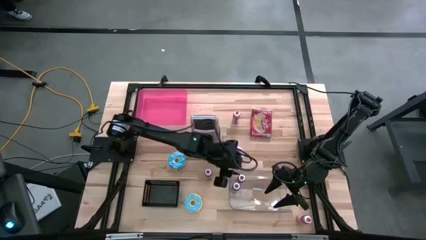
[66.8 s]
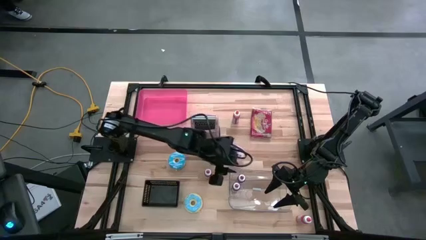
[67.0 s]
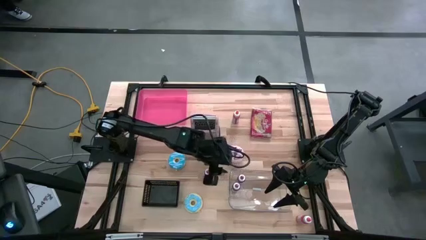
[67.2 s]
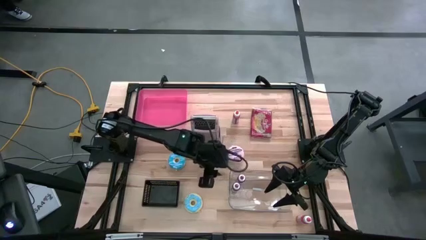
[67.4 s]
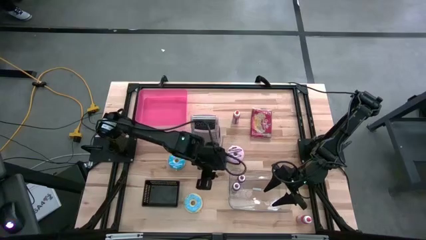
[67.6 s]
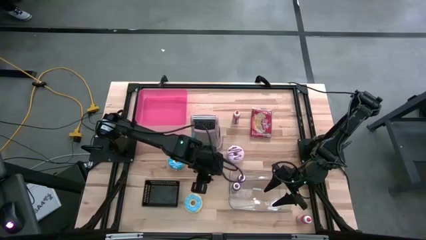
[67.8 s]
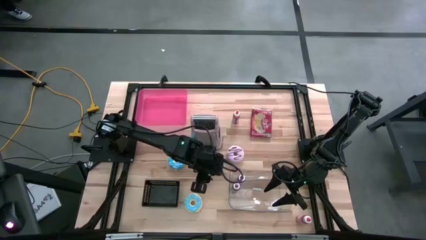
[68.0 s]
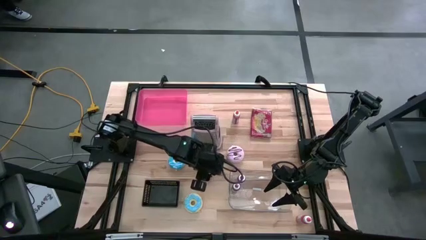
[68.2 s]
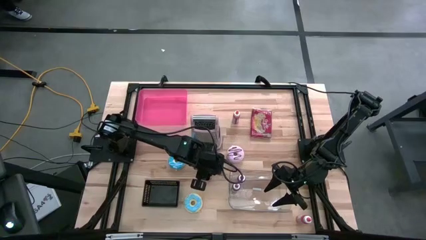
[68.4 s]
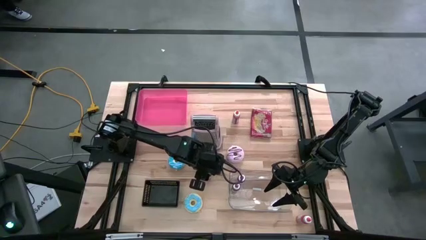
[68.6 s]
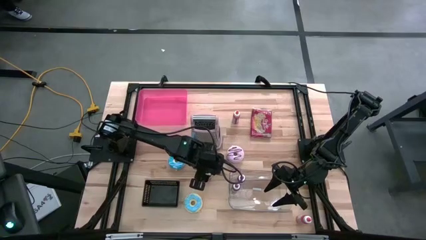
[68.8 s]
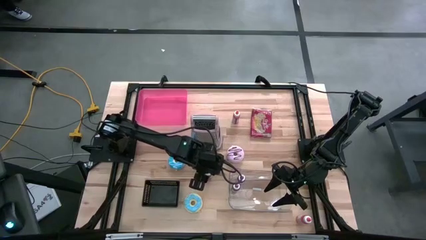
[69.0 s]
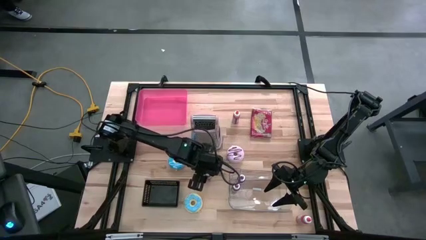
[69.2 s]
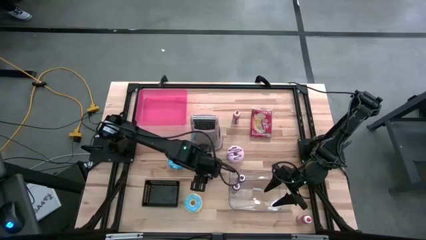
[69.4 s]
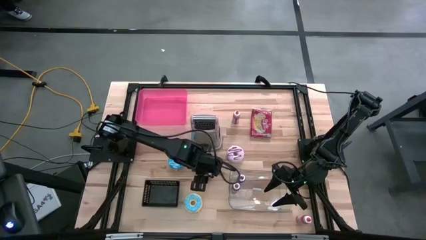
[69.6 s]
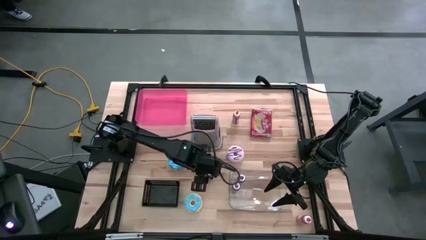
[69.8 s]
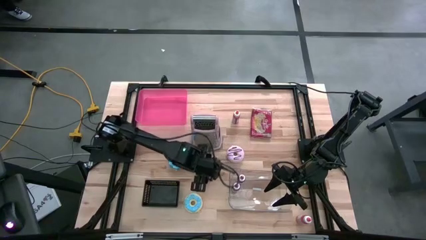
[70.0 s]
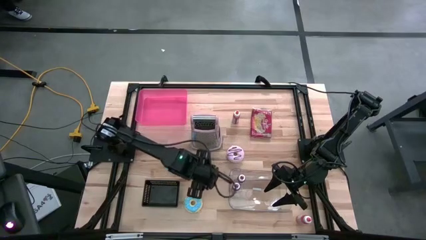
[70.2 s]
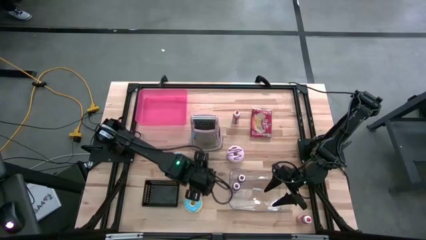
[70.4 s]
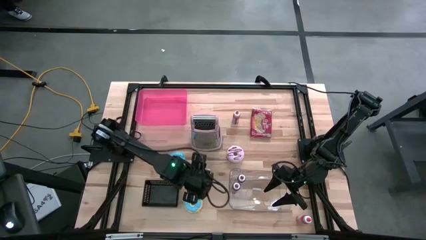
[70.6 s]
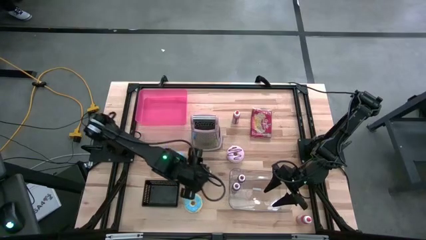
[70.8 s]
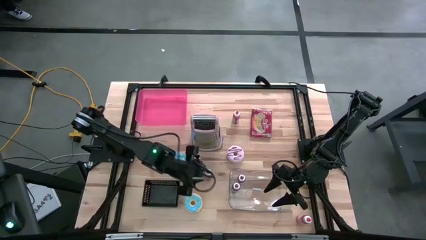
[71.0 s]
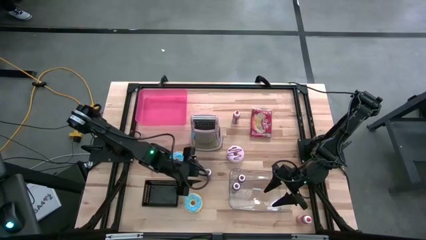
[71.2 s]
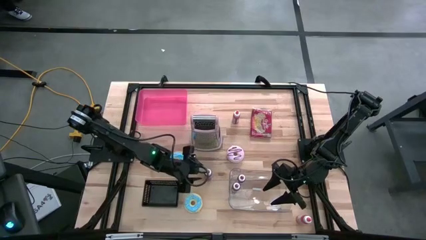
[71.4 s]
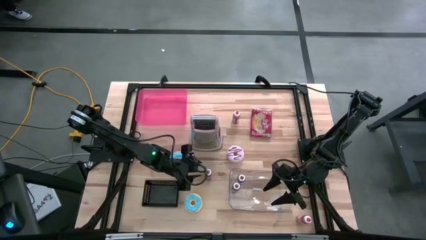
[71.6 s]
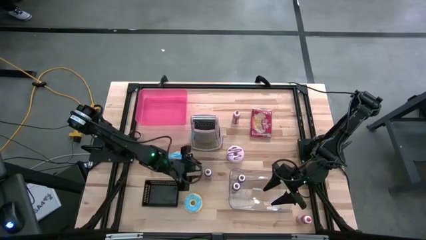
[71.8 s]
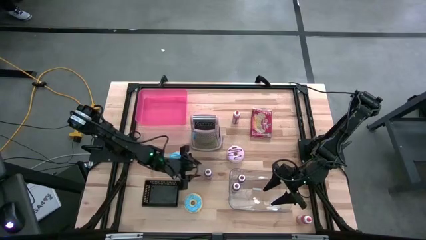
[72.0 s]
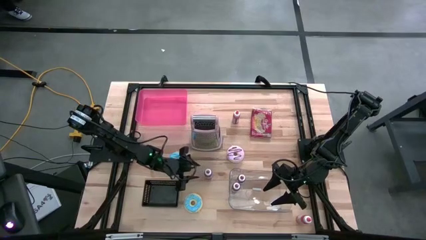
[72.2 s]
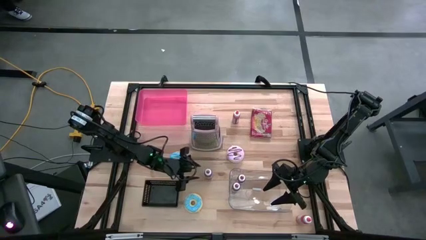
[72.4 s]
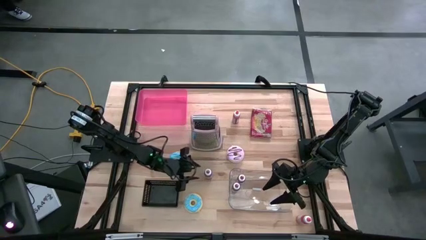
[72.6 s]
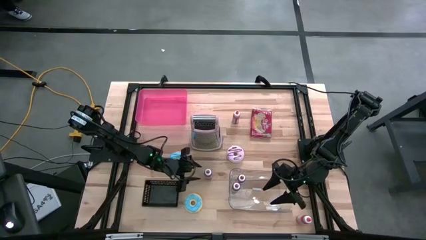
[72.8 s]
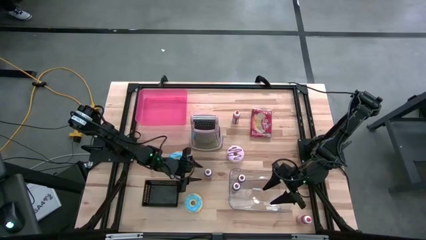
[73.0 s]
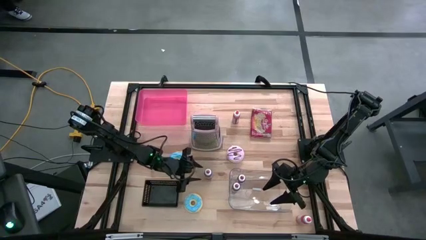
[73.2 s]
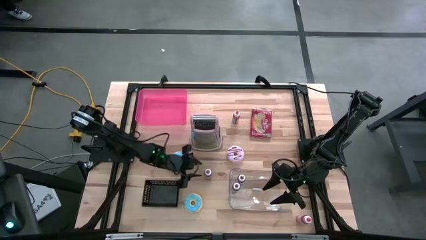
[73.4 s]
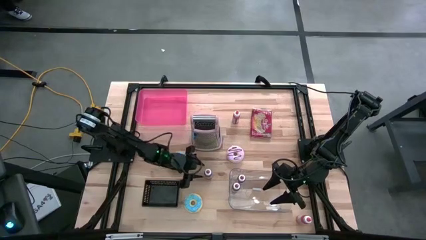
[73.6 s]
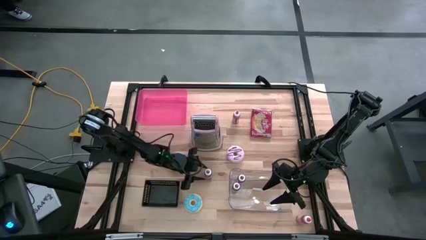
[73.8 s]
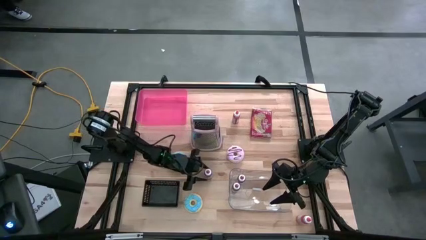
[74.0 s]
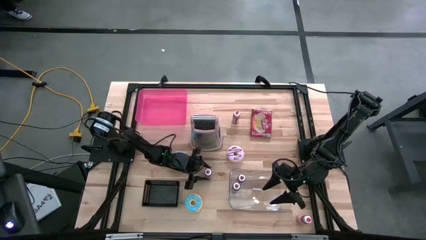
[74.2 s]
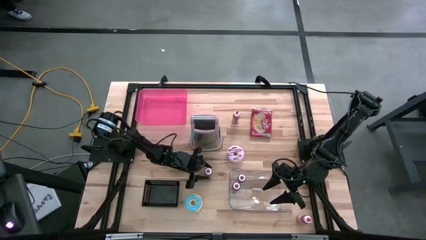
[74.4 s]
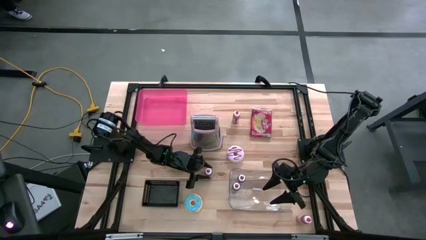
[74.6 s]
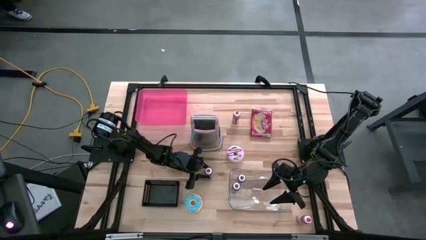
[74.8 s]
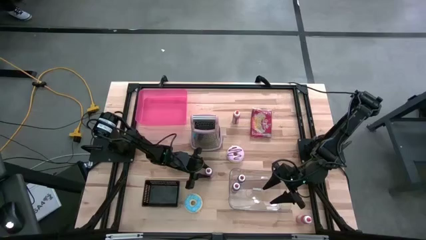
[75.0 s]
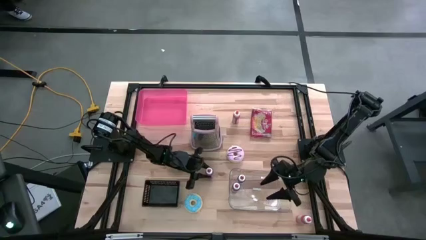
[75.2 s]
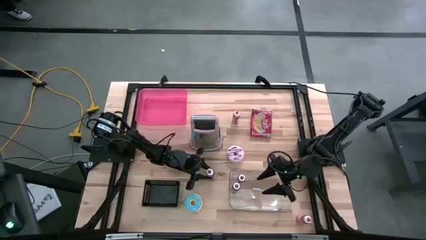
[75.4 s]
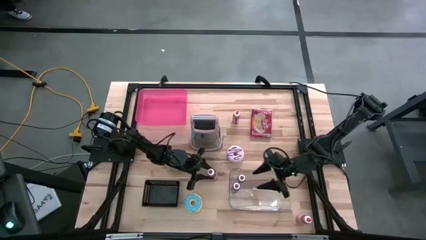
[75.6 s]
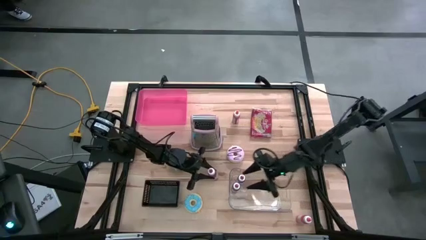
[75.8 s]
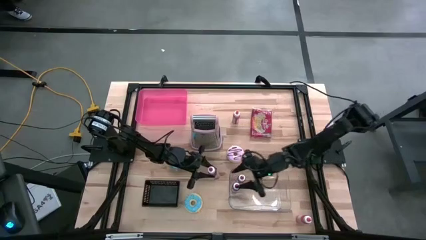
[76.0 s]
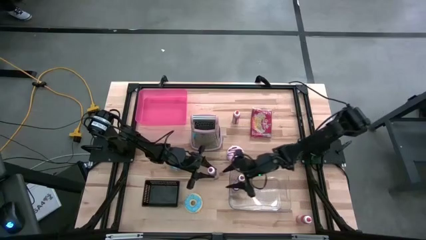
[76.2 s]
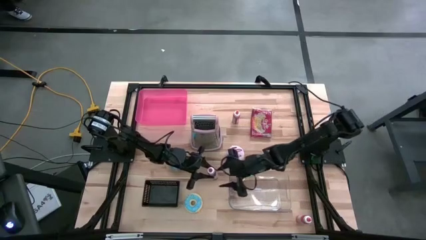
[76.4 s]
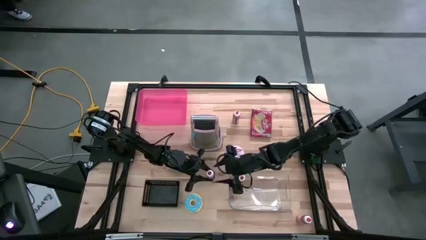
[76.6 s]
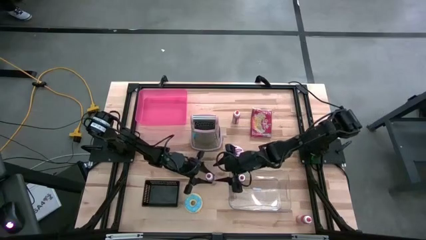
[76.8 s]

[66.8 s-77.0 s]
Task: Pick & Place Food Item
Put the red food coloring bottle into the transparent bin

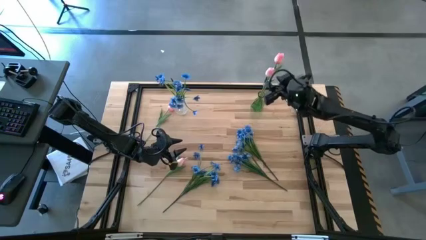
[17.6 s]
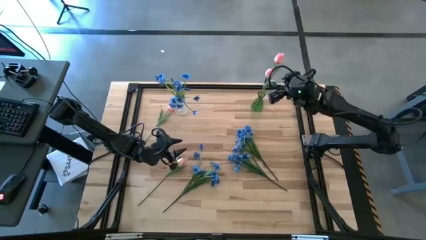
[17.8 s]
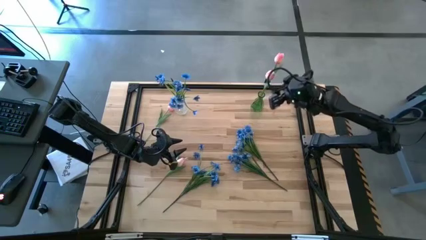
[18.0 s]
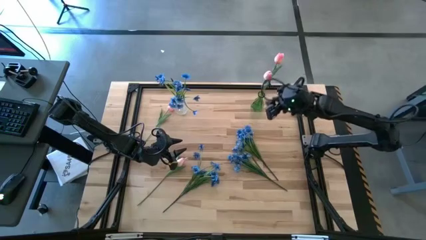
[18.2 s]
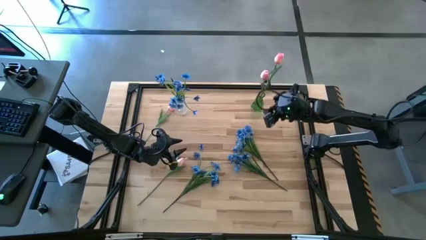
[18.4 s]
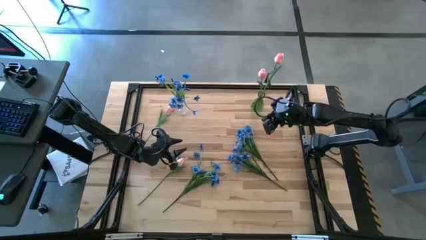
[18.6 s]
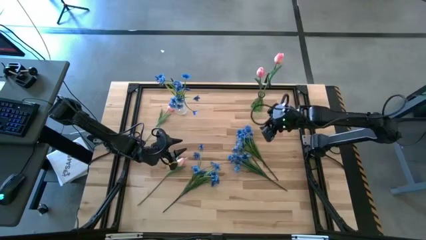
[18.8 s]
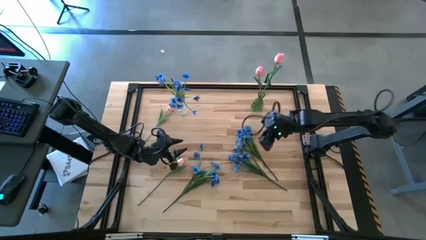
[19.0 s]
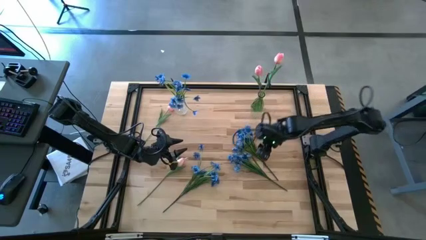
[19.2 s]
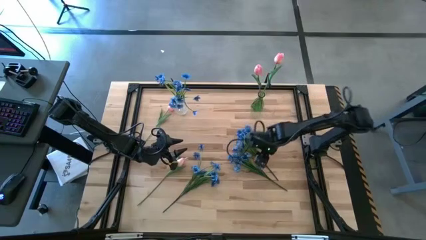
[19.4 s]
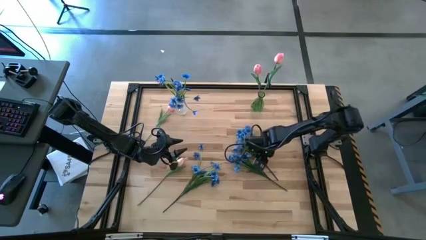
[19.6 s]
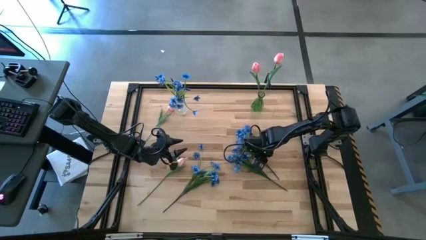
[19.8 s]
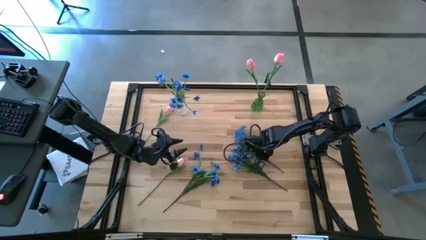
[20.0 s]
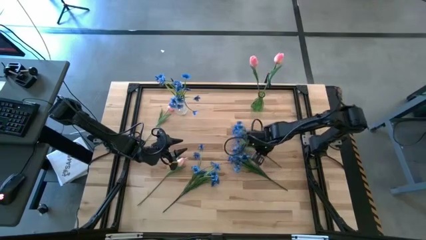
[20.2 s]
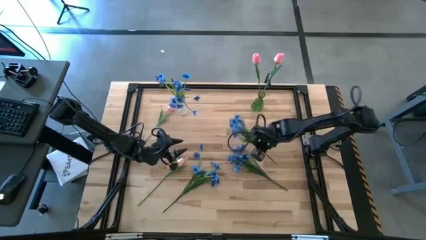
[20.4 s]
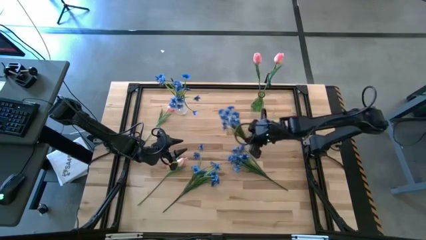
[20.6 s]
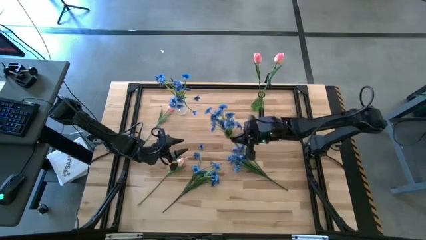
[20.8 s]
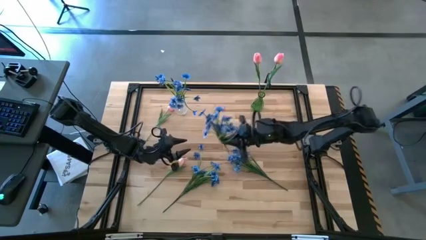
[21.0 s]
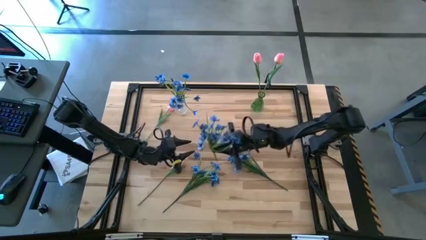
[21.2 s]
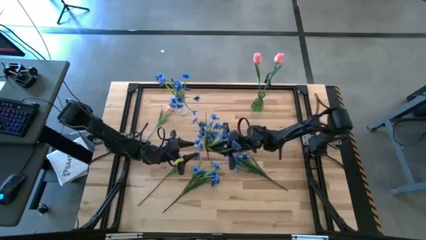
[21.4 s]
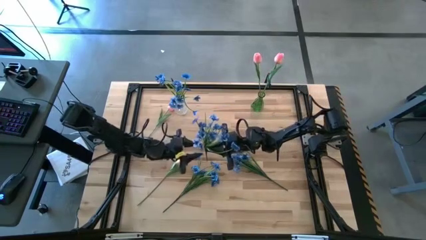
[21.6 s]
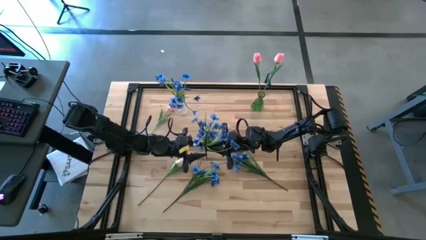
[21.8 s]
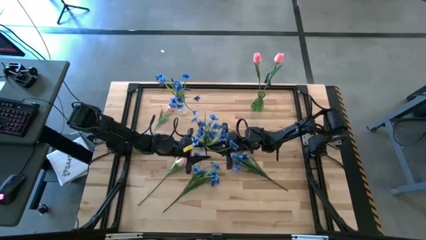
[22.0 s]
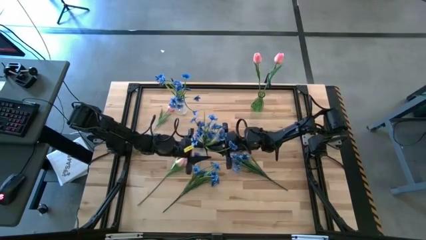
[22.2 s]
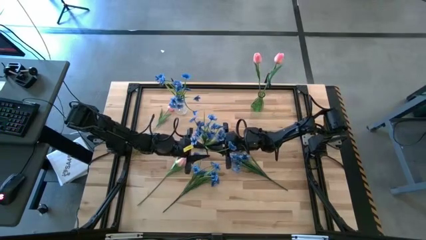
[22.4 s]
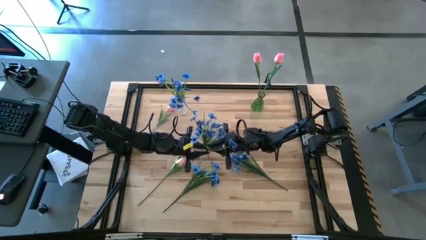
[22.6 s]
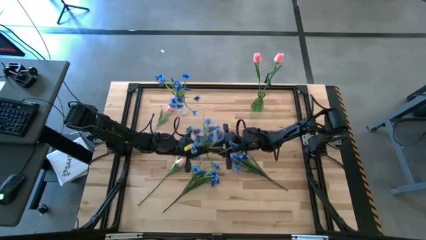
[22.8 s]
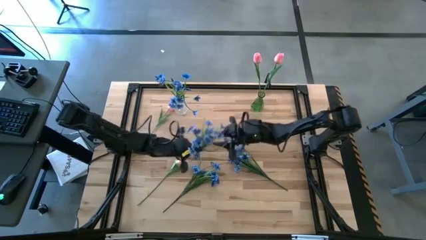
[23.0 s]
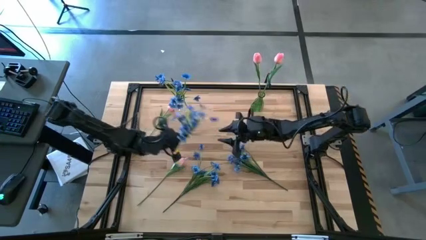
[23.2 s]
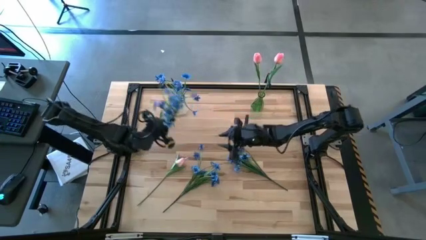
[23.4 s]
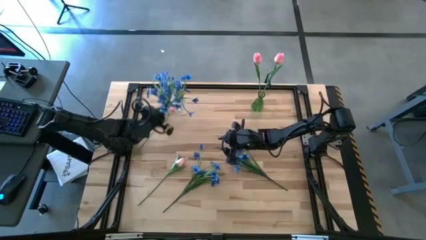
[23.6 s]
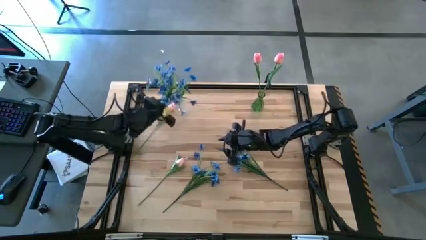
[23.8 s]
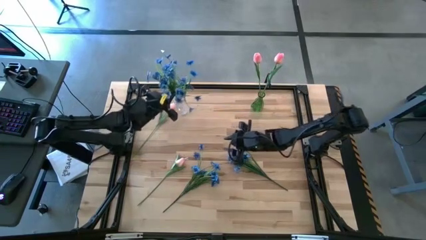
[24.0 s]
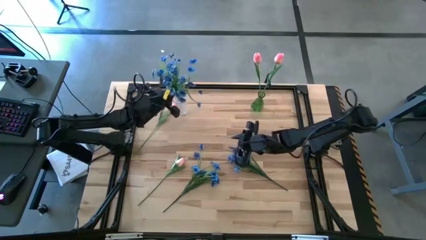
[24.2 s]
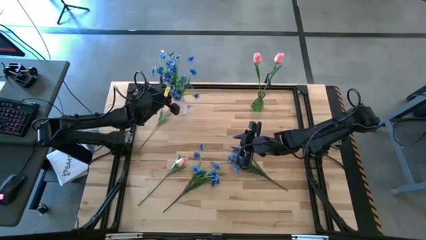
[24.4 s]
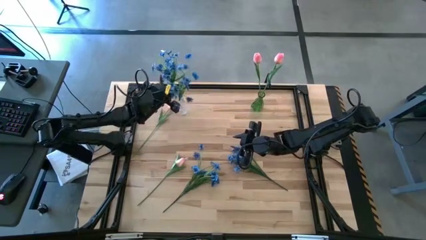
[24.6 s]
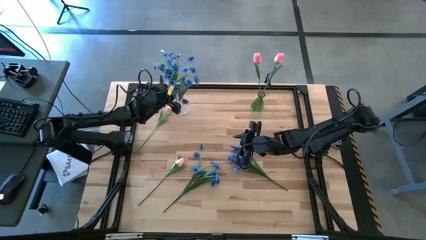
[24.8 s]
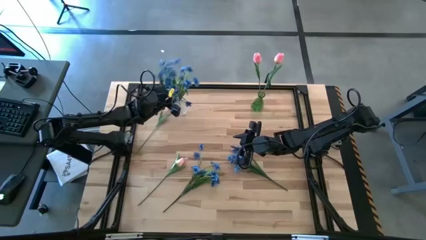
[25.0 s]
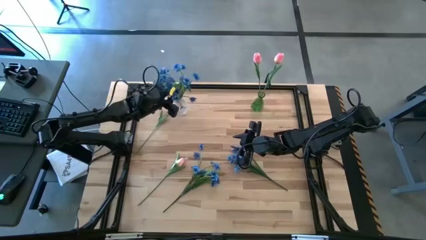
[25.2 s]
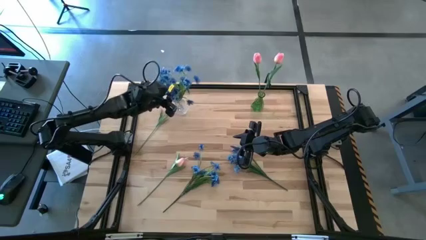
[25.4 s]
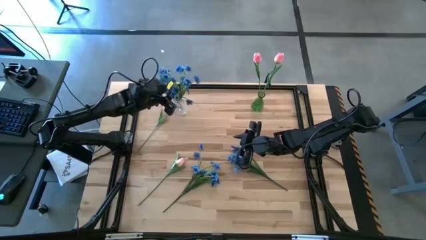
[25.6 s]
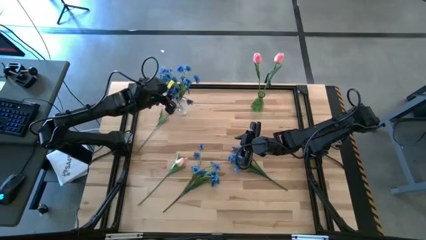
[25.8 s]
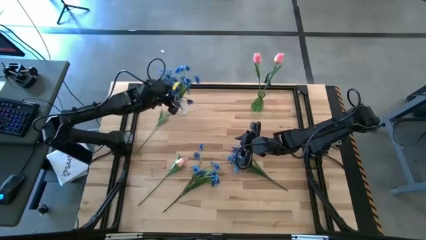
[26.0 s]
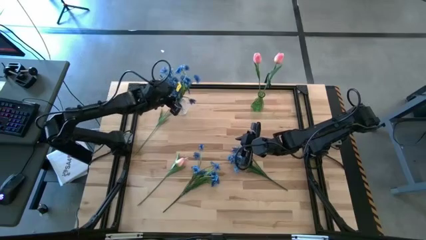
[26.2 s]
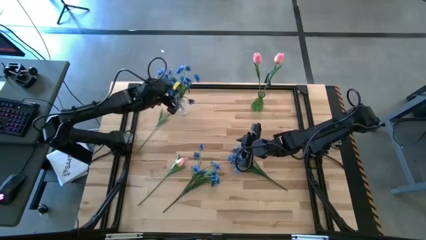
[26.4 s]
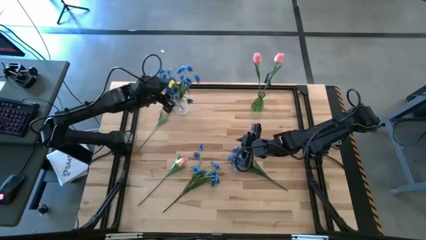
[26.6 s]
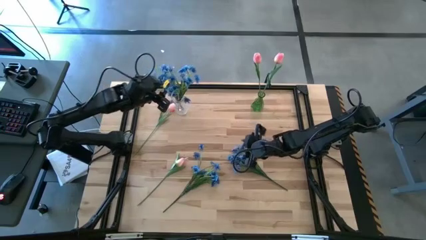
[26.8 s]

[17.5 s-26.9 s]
Task: Sort flowers into vase by color
Put the blue flowers into the transparent vase
